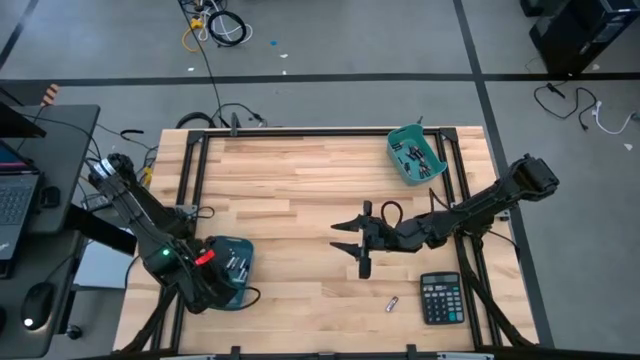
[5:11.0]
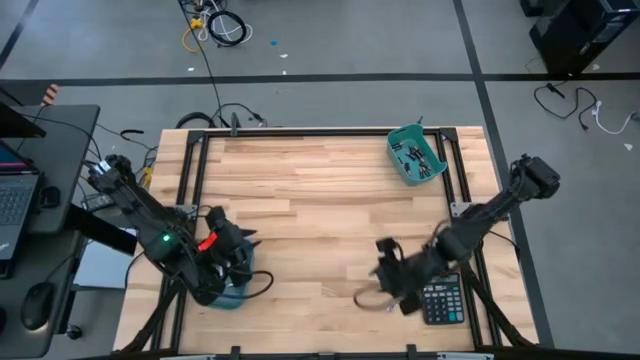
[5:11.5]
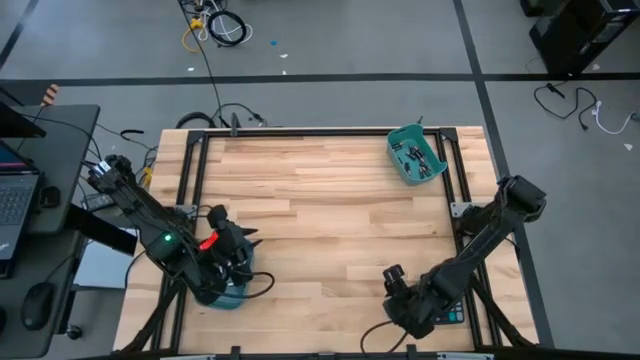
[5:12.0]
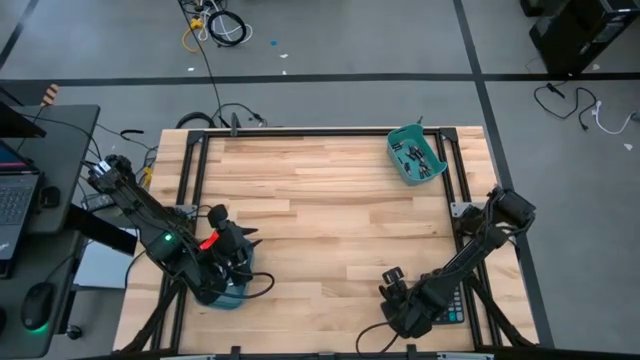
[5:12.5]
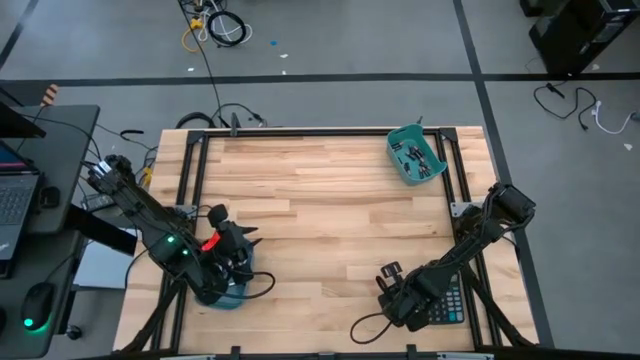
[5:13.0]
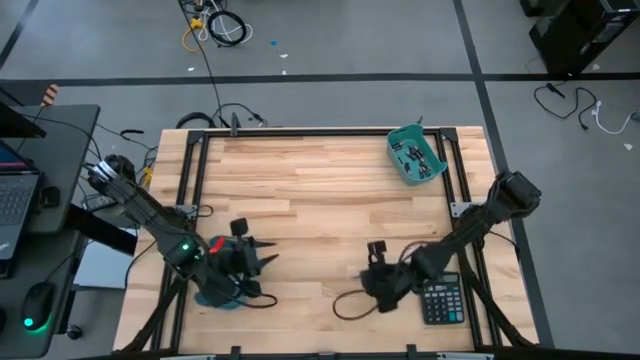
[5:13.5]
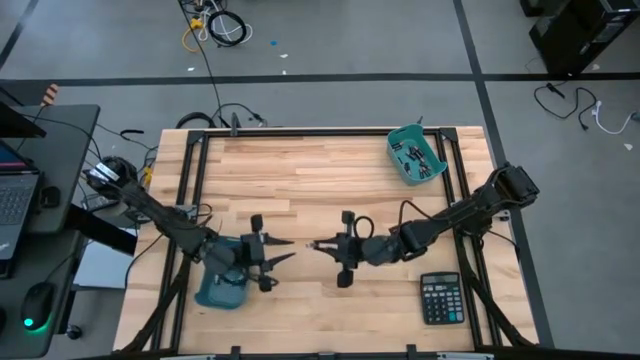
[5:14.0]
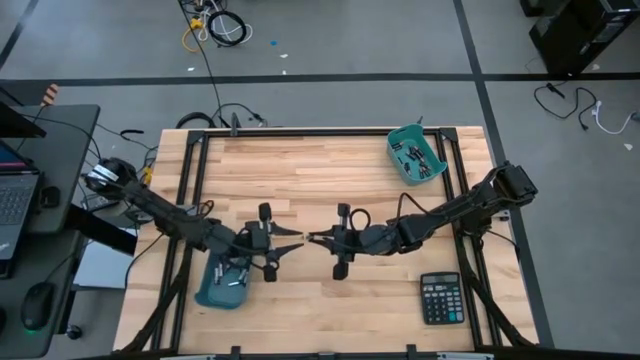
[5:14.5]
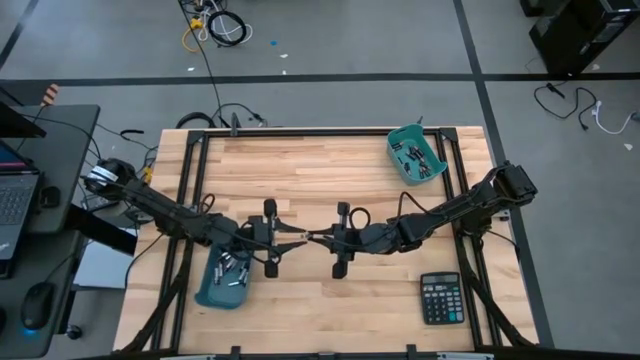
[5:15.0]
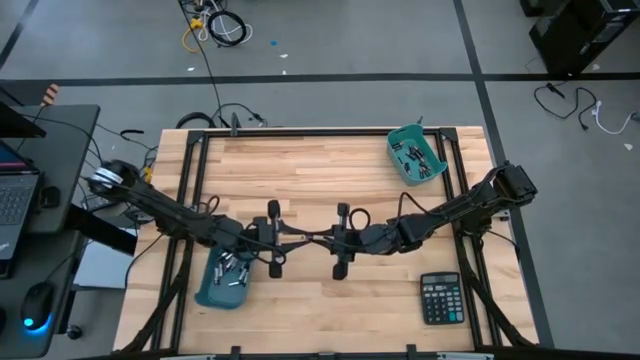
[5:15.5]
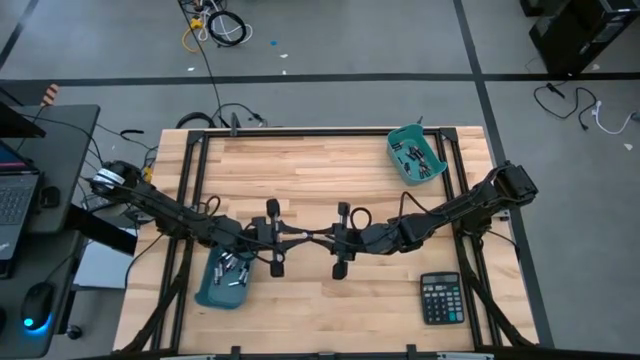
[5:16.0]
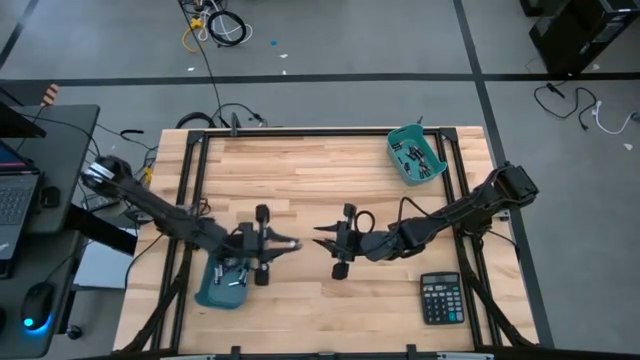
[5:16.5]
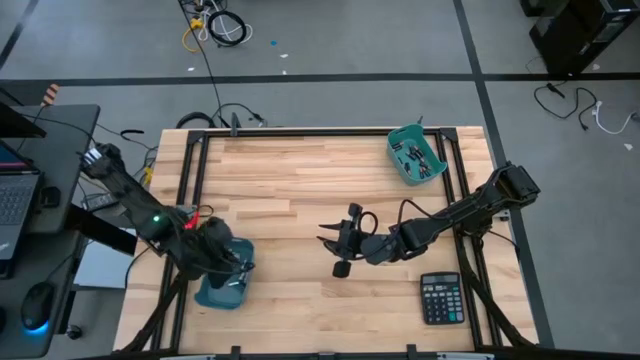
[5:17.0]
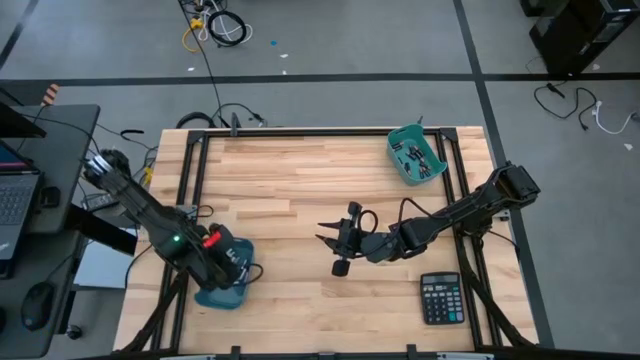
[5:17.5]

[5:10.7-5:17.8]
Task: Sort batteries
Put the silver battery into the blue bin

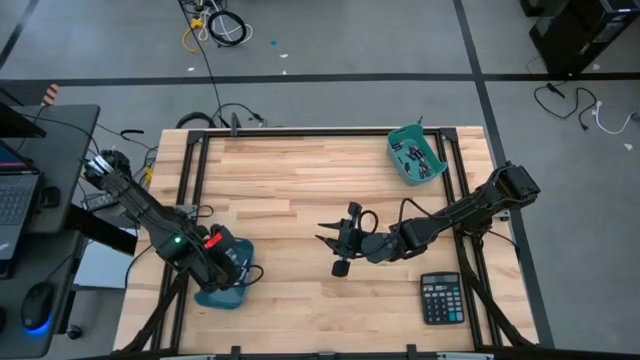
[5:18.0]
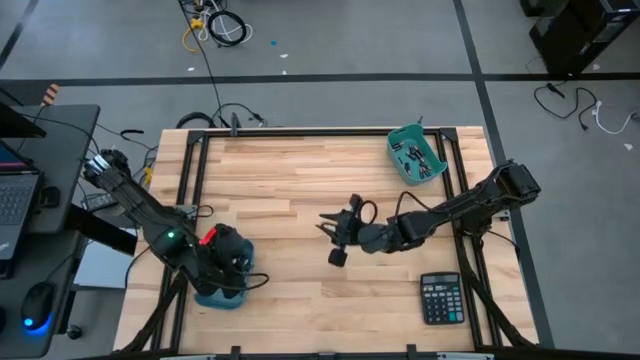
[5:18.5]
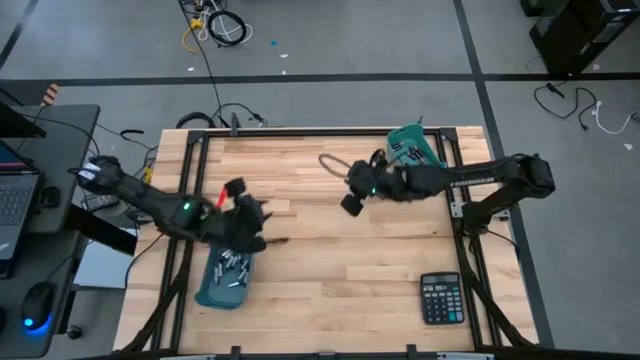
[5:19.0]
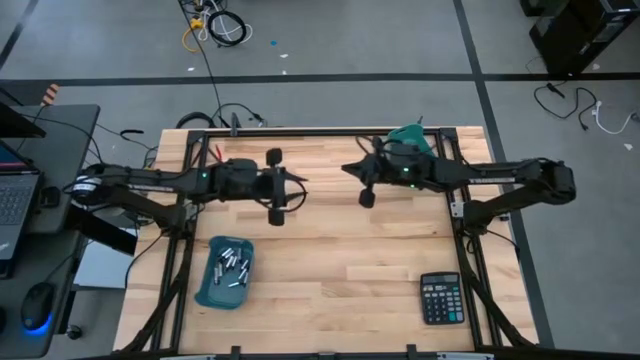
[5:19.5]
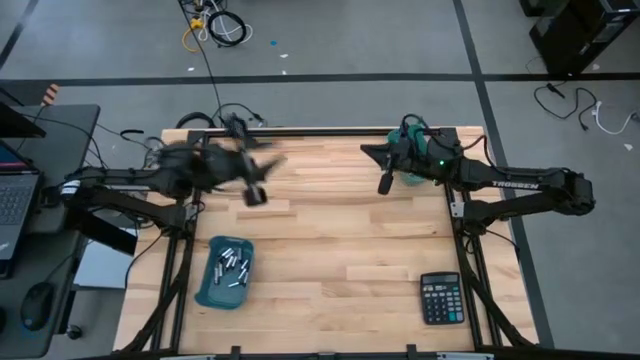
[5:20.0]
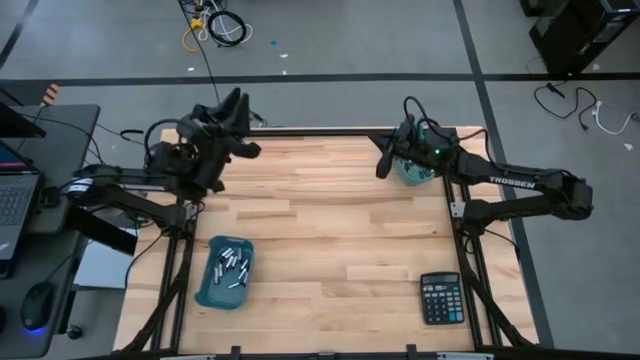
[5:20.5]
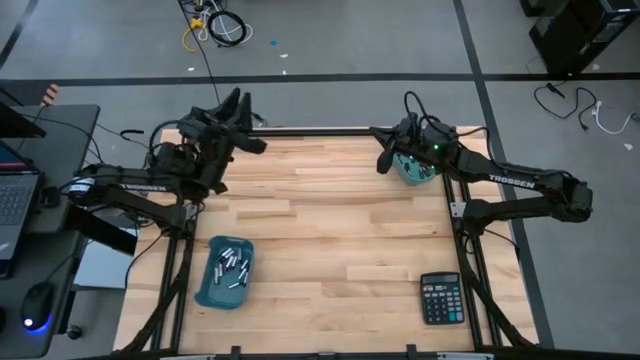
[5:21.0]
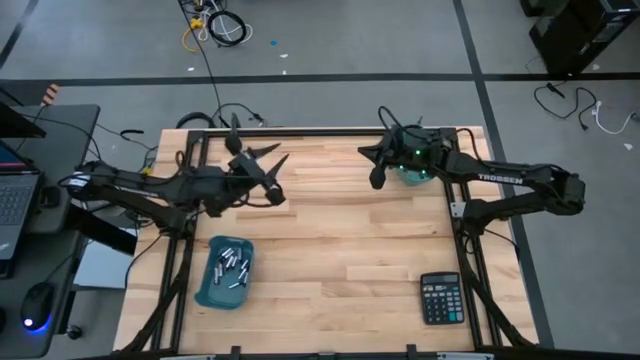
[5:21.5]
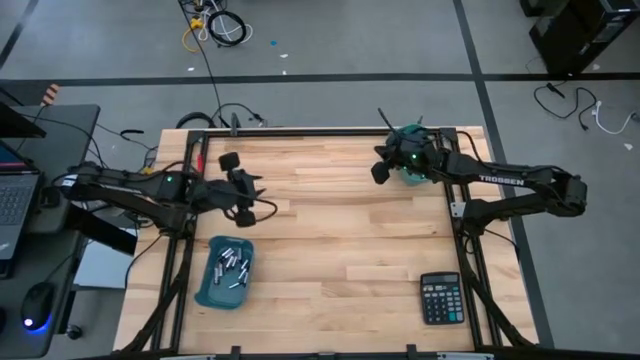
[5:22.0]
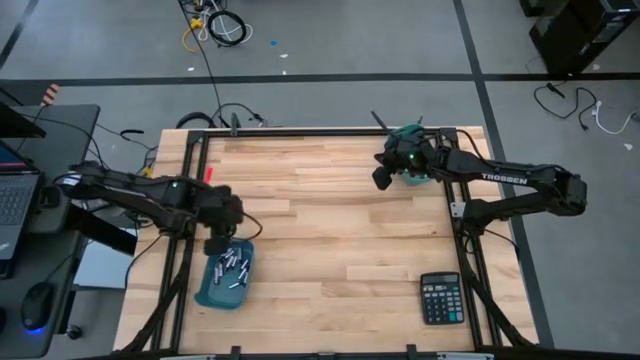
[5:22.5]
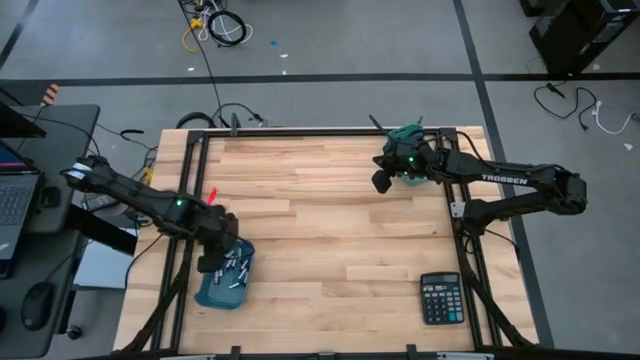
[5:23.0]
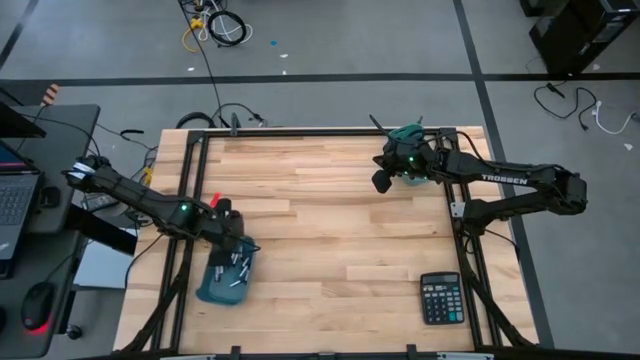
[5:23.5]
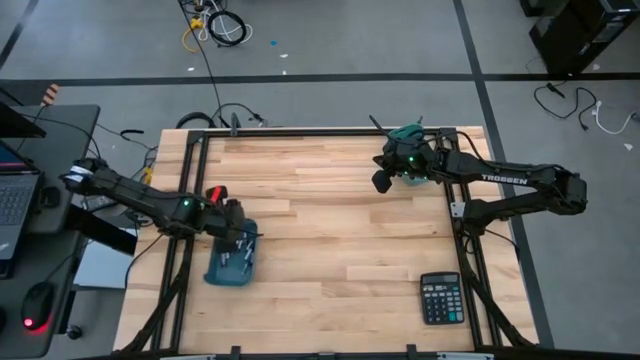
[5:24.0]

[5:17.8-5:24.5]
Adjust the blue bin

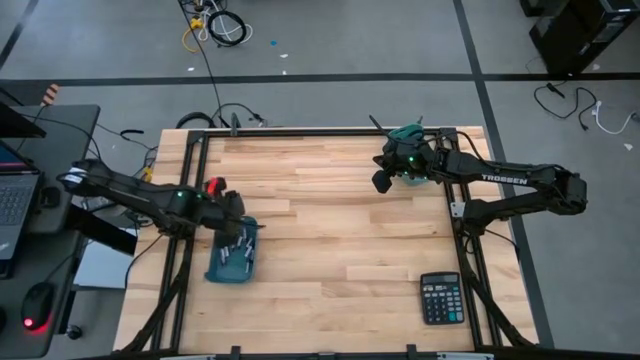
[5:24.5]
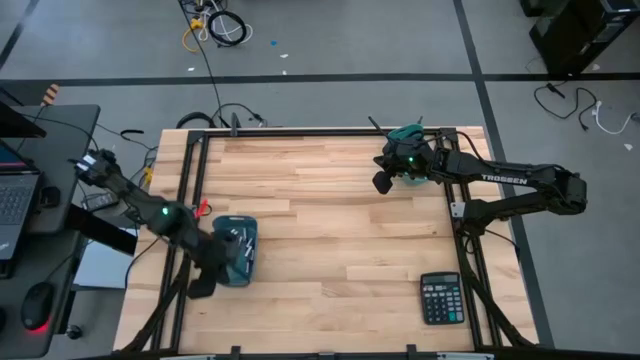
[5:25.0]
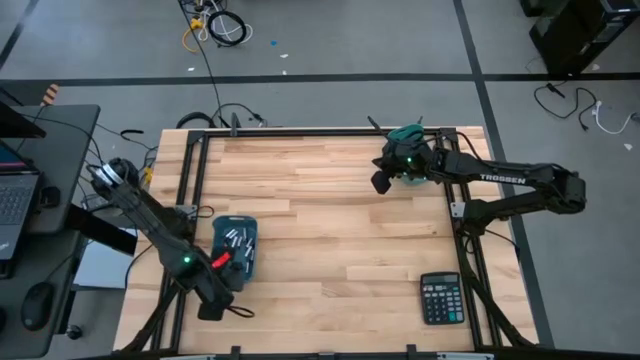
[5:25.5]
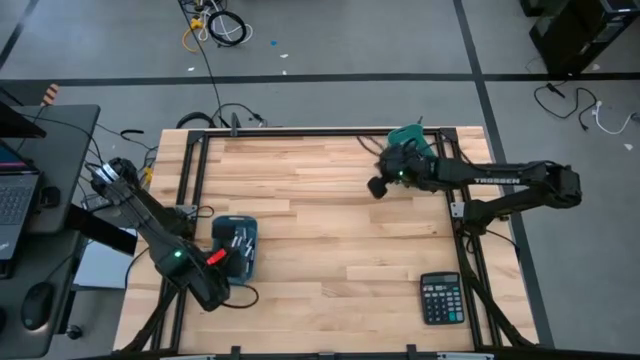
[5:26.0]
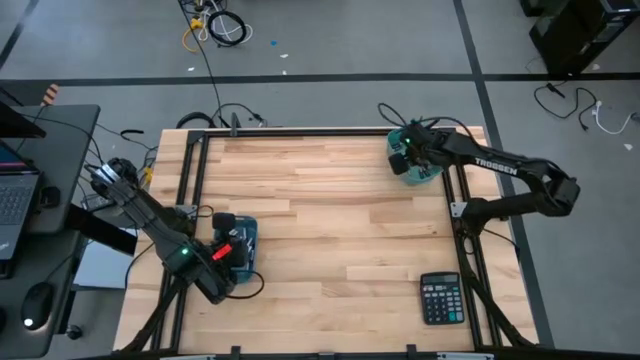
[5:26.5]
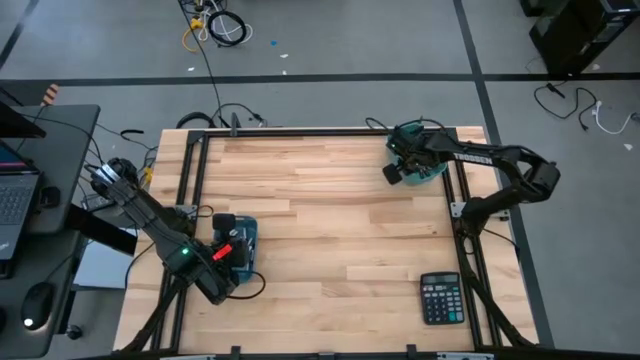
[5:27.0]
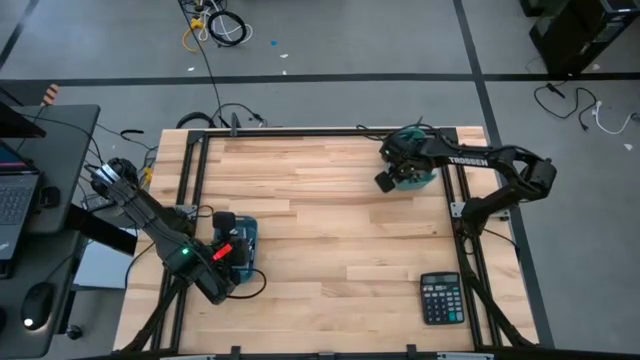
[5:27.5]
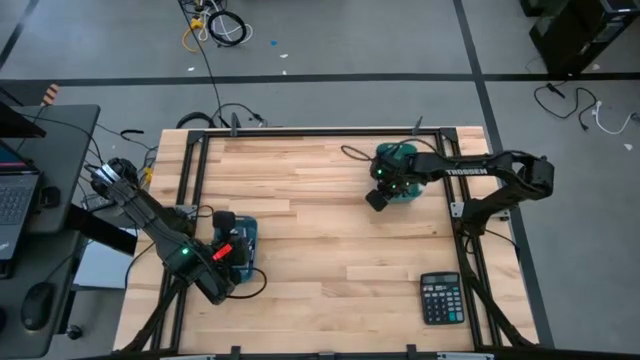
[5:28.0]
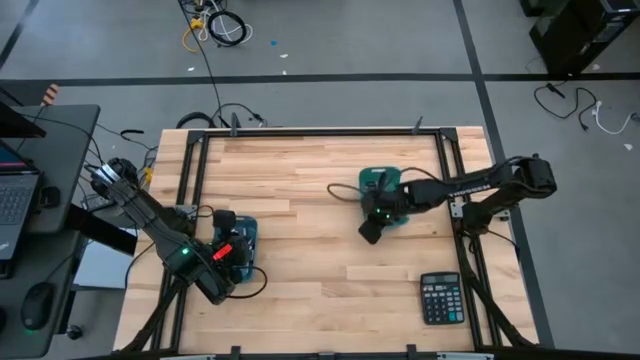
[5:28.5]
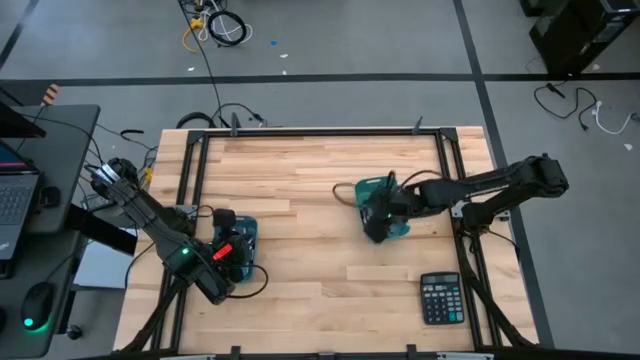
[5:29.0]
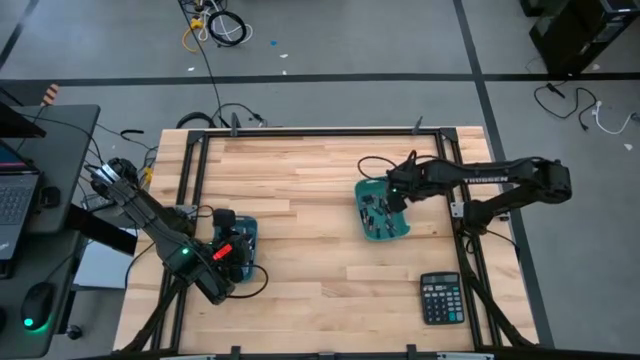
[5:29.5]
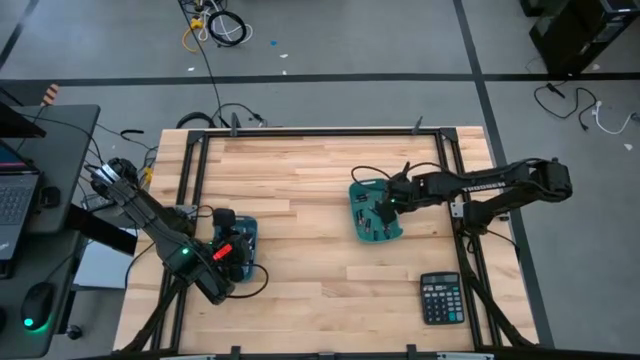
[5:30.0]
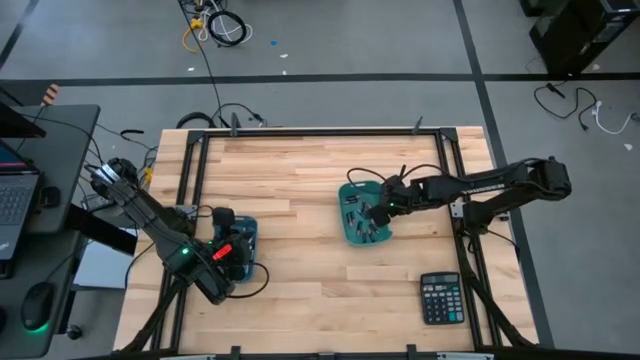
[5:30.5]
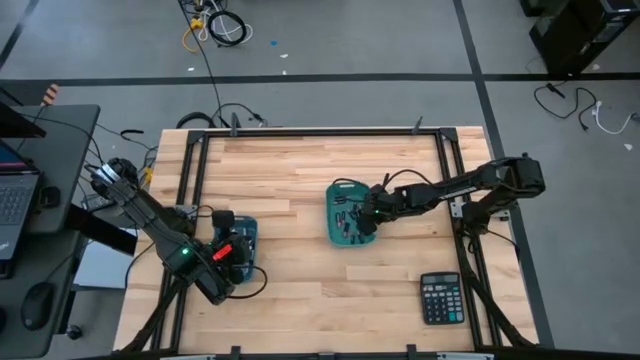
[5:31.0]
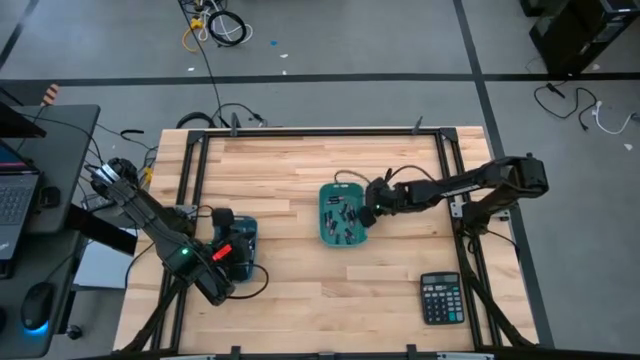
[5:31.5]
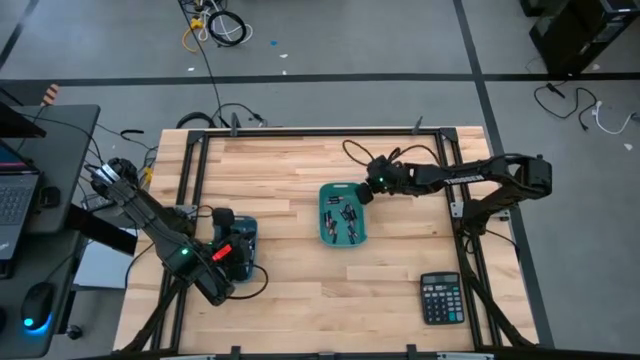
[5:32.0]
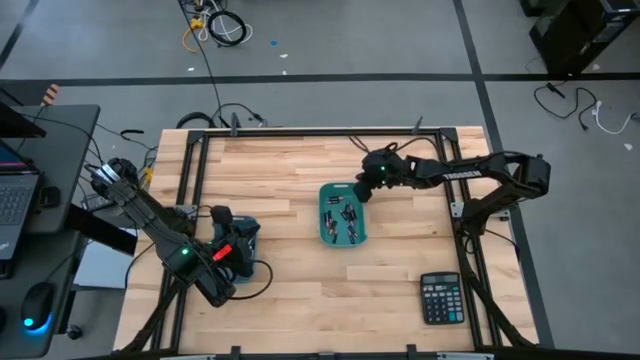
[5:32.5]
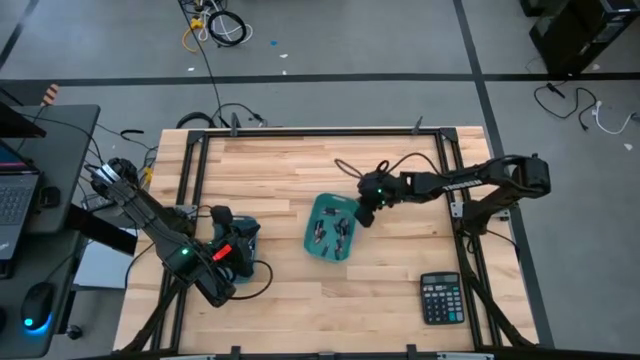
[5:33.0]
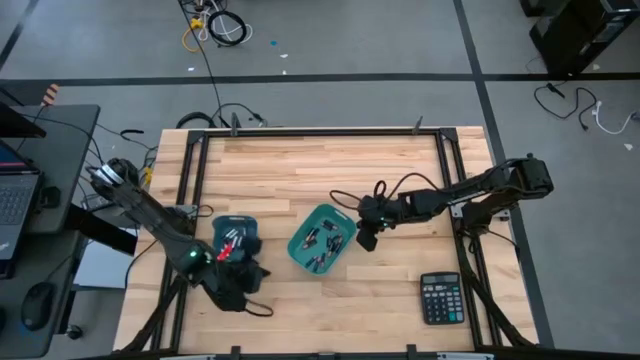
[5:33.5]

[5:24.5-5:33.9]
Move the green bin from the top right to the center
